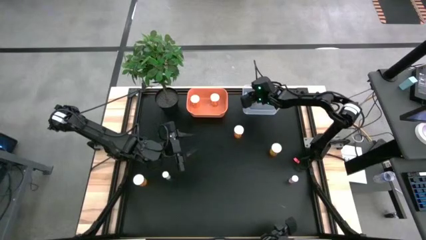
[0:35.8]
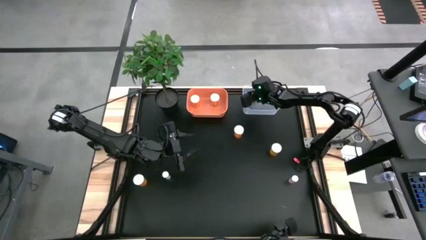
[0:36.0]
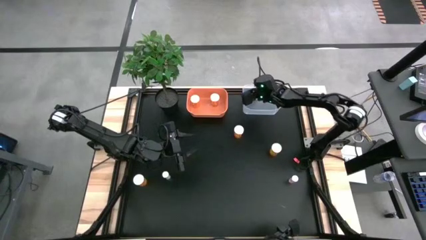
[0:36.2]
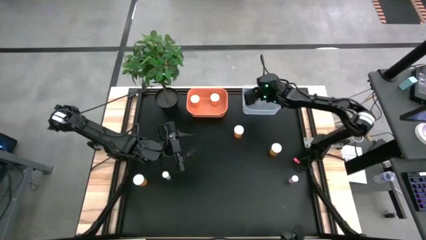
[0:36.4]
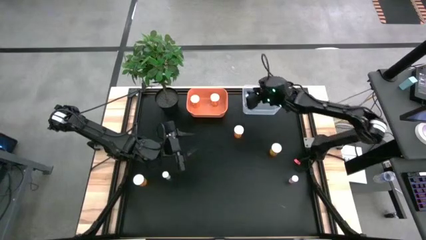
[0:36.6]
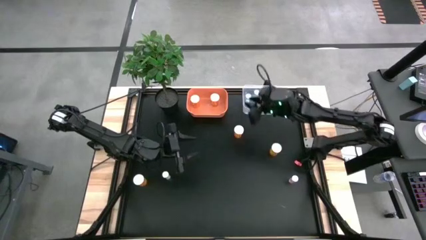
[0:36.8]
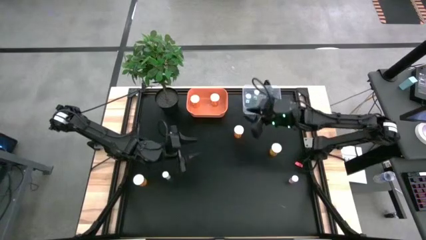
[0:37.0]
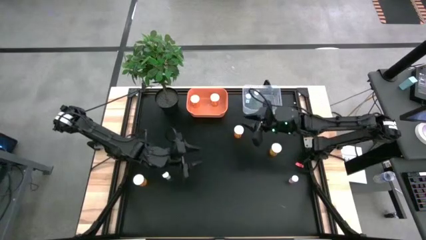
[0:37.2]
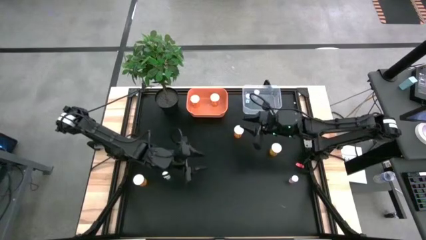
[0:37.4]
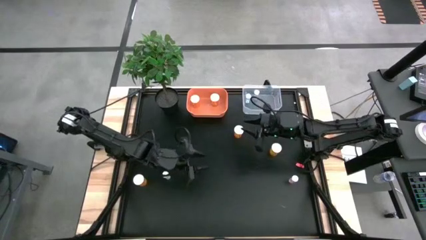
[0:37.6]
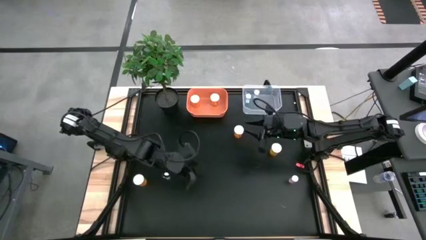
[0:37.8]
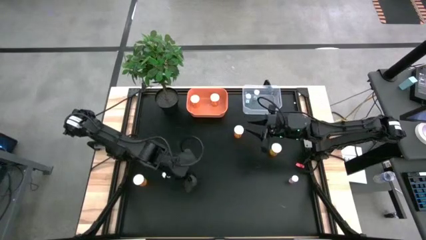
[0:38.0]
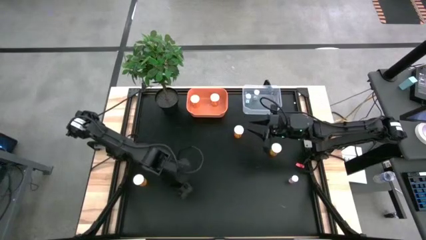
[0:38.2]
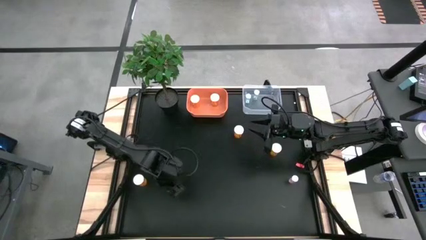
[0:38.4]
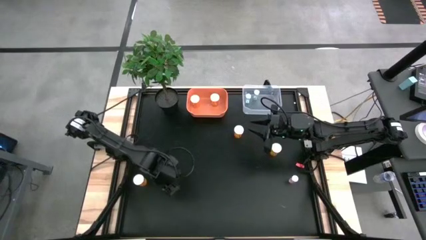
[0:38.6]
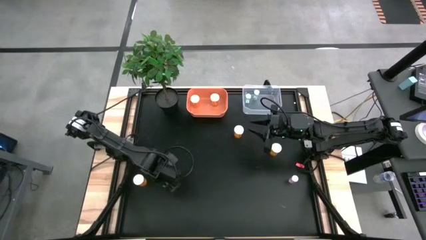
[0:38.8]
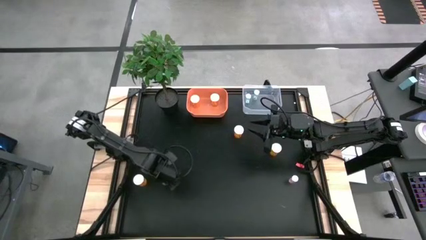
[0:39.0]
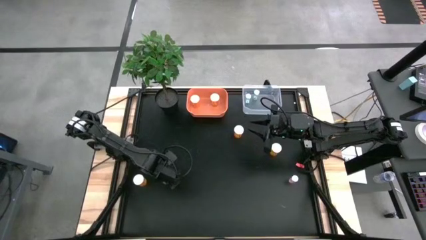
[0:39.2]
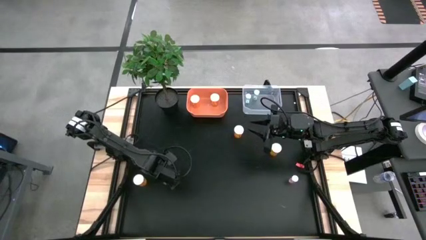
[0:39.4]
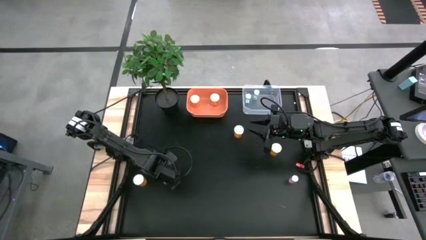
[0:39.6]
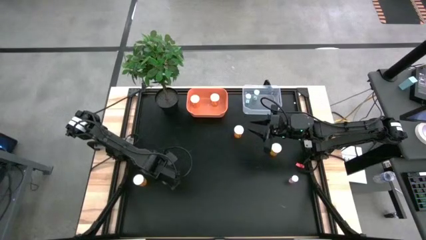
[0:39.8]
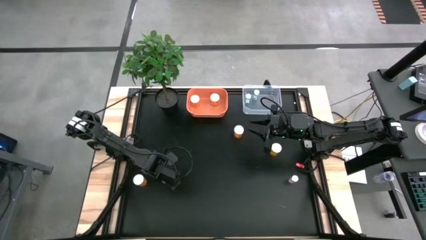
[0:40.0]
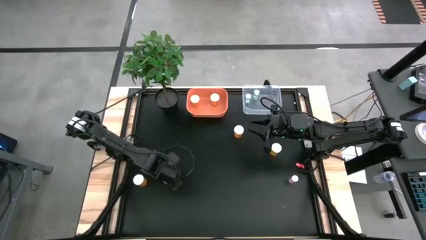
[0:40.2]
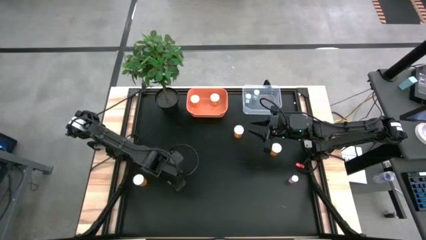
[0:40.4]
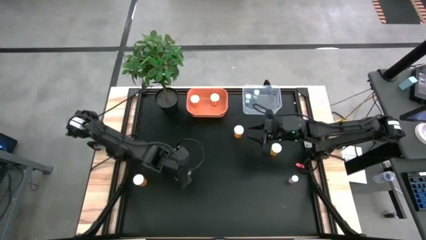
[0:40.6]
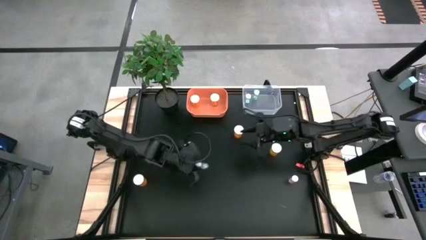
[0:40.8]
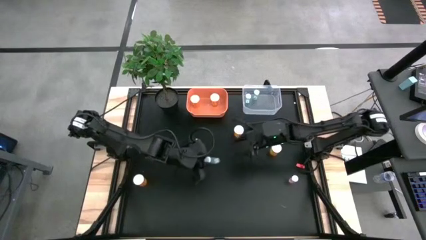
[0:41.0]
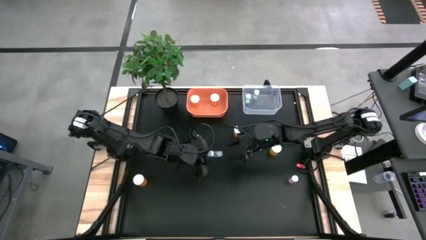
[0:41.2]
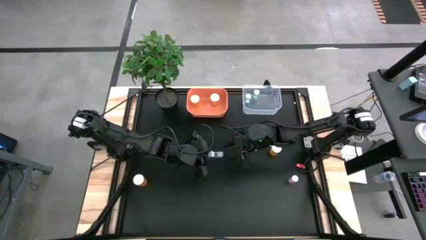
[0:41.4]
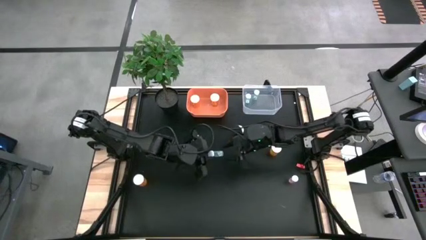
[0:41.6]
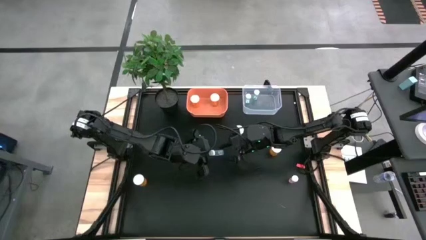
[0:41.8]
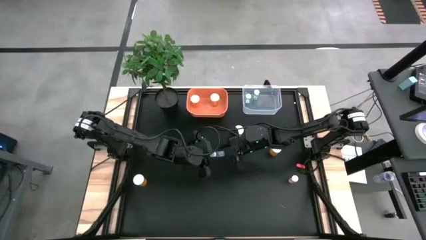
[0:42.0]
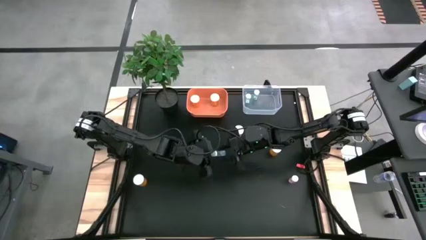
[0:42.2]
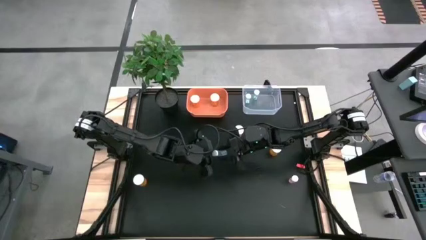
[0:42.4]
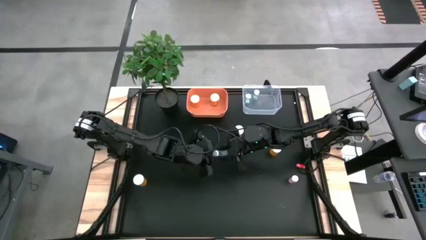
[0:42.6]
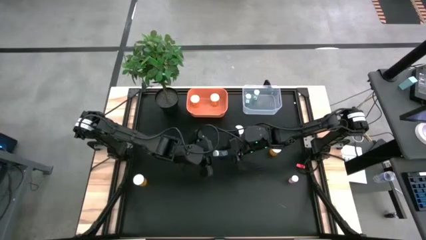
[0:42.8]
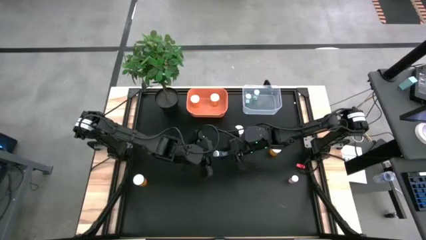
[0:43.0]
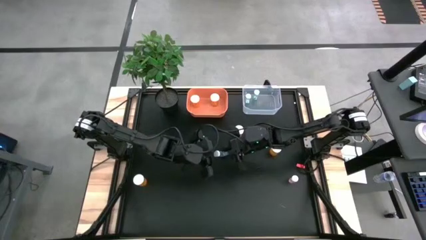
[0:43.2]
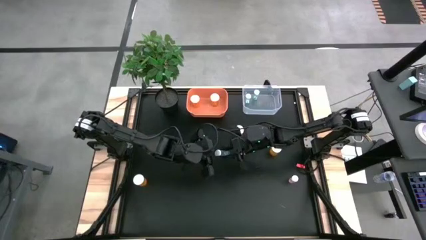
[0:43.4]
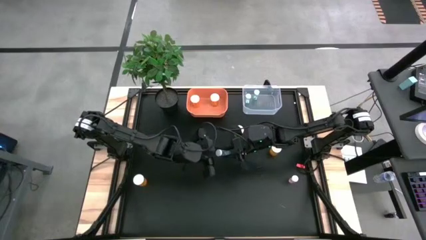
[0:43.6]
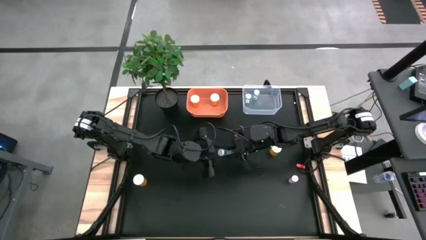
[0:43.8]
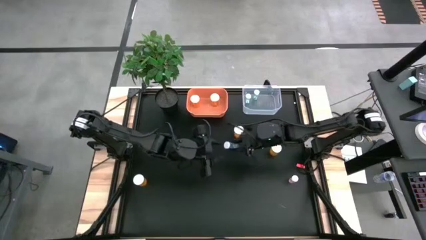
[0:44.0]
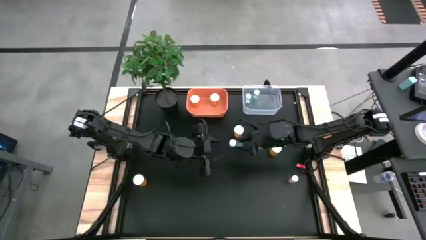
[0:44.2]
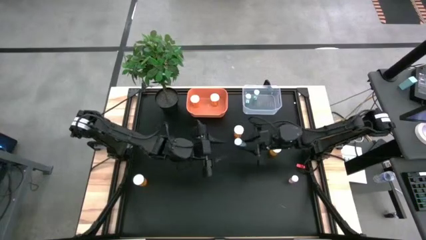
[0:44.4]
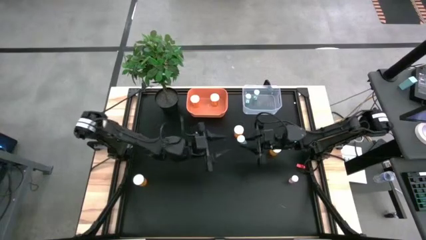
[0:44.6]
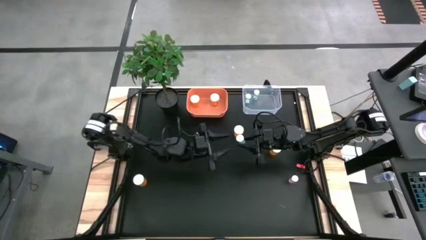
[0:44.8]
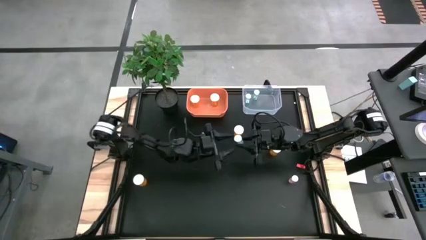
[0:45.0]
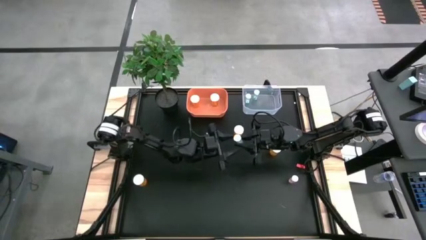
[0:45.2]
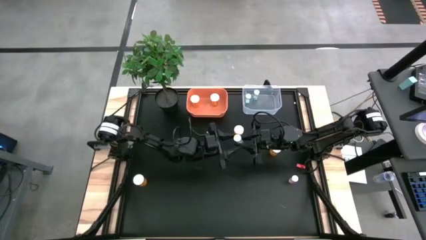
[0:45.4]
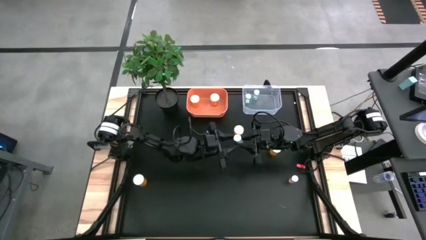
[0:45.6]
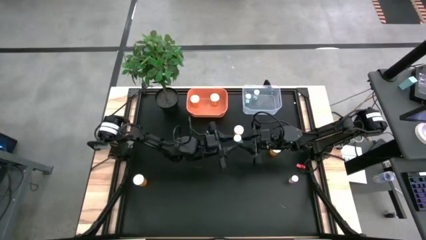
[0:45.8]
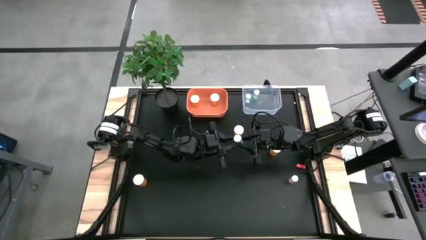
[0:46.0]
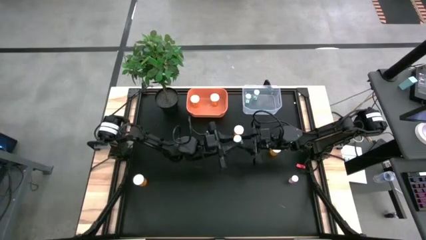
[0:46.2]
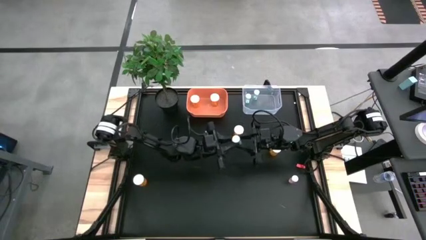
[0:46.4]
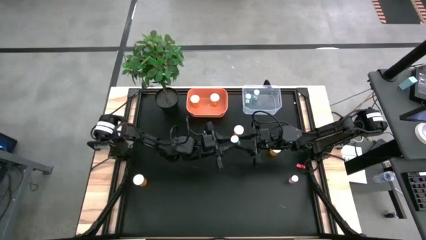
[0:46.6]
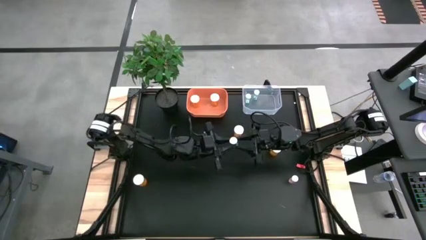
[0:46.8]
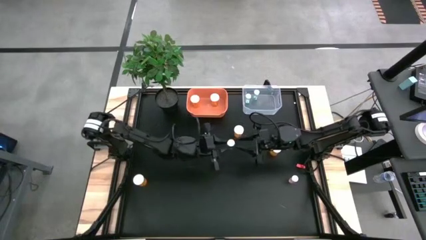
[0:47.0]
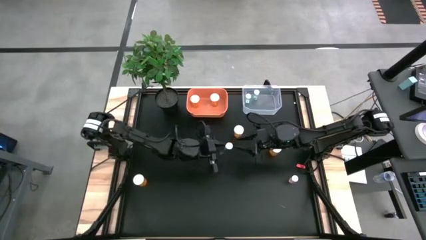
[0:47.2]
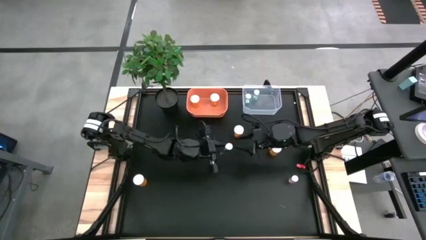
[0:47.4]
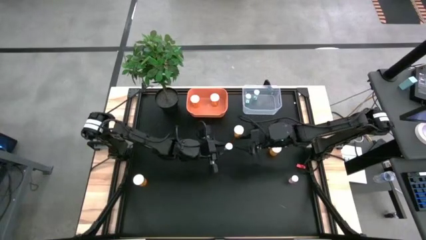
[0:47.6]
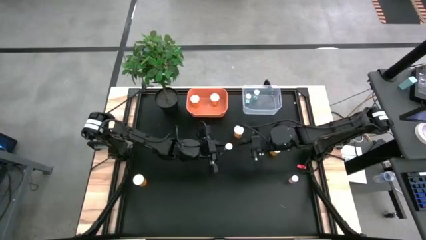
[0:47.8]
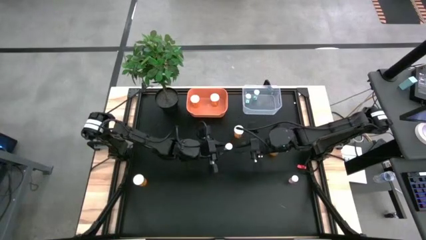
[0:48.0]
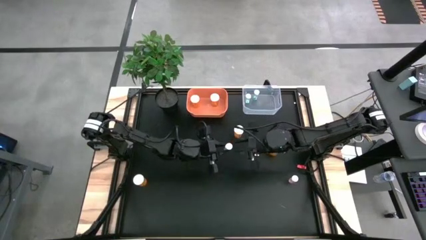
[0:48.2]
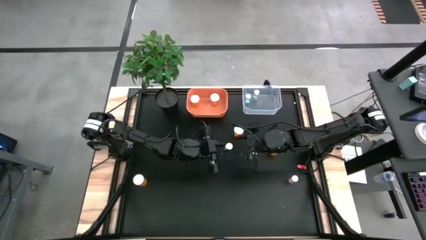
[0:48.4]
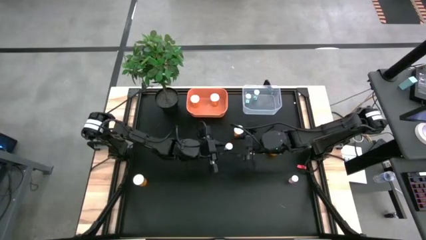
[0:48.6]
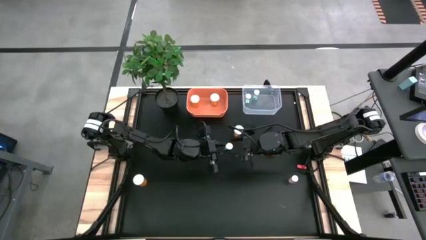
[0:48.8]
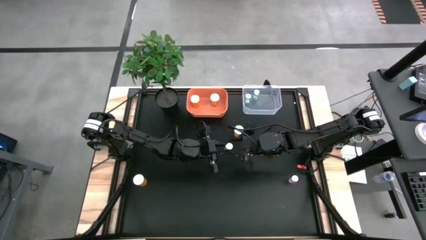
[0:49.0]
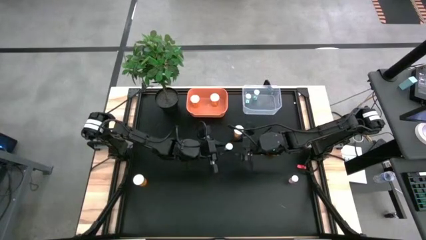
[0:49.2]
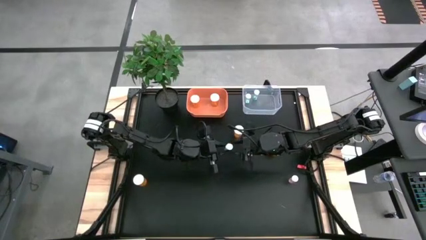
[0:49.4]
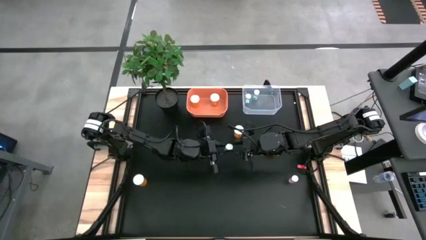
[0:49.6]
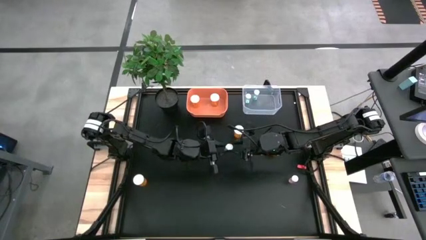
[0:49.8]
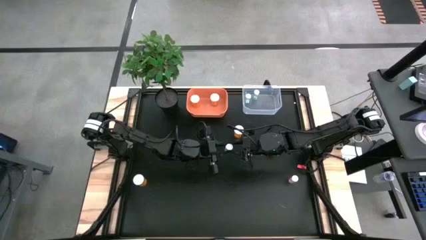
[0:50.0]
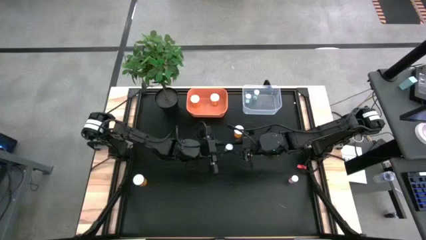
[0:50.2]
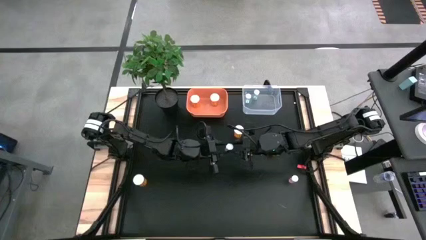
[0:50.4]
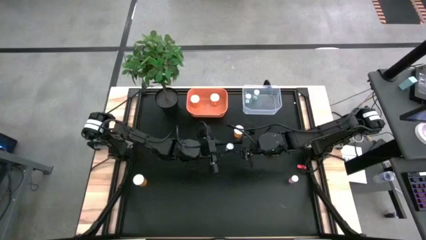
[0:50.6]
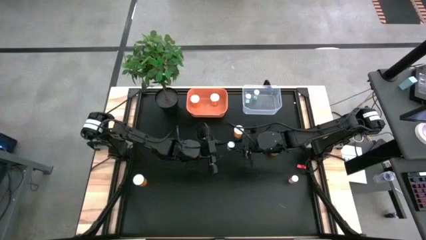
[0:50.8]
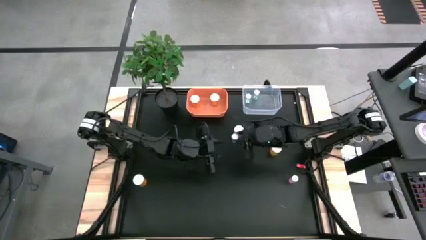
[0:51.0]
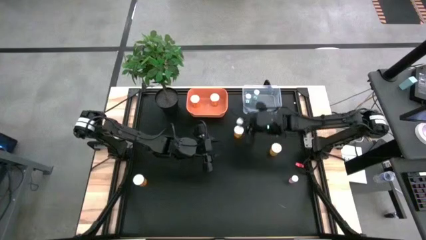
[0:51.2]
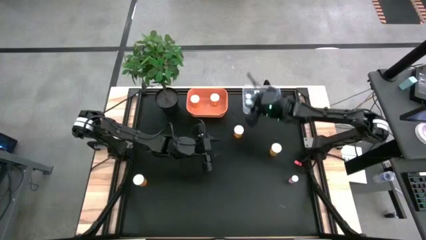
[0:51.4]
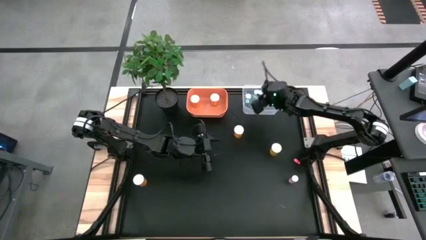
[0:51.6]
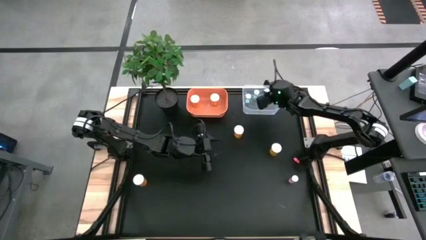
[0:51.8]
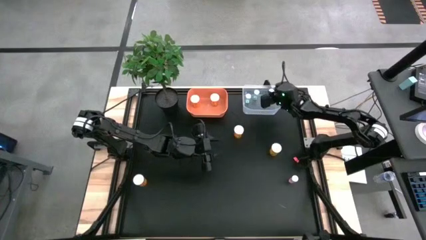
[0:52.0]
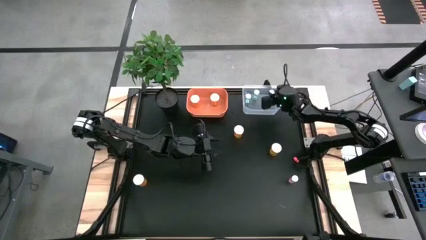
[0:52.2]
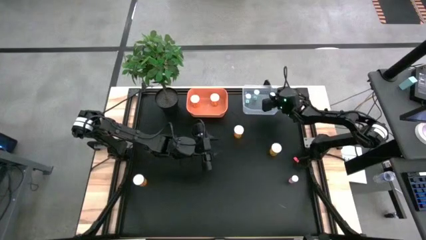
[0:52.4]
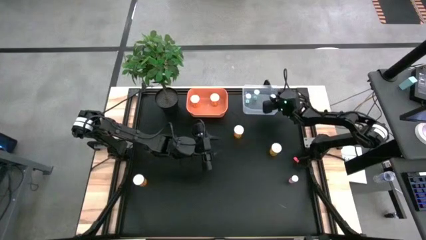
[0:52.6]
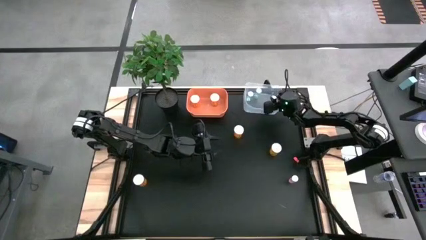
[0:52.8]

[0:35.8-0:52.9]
Task: Pick and place medicine bottles into bin by pill shape (circle, oval)
Put the blue pill bottle into the transparent bin
